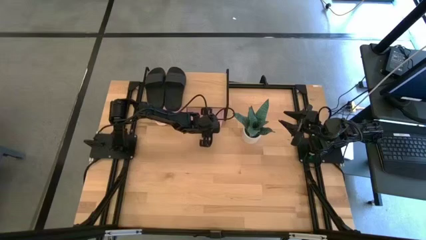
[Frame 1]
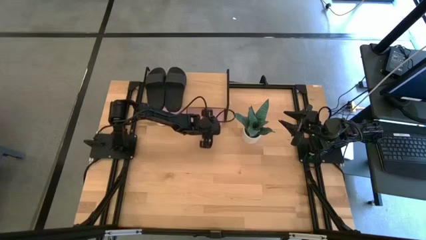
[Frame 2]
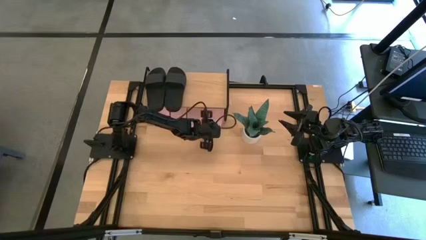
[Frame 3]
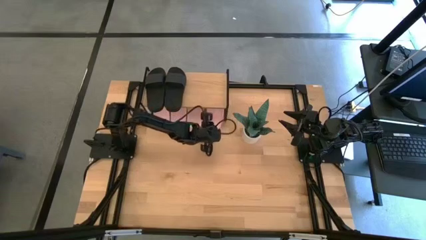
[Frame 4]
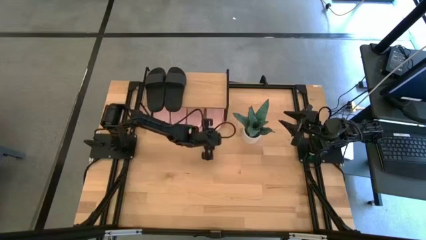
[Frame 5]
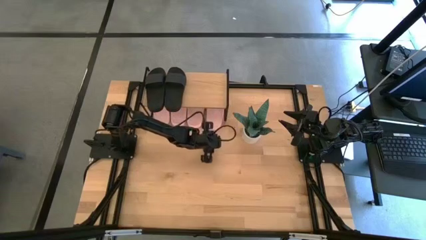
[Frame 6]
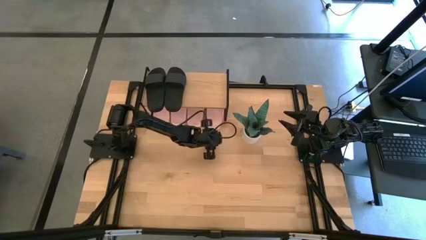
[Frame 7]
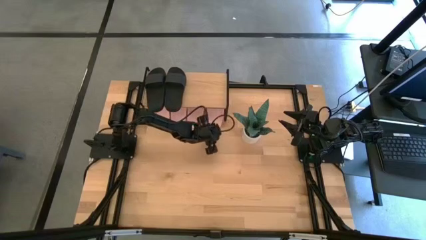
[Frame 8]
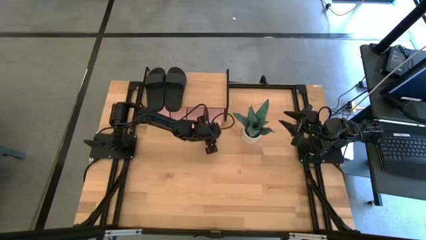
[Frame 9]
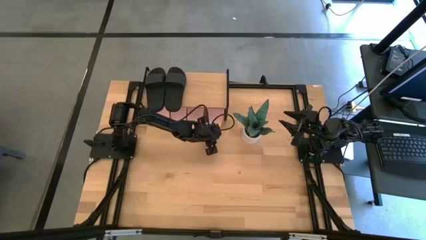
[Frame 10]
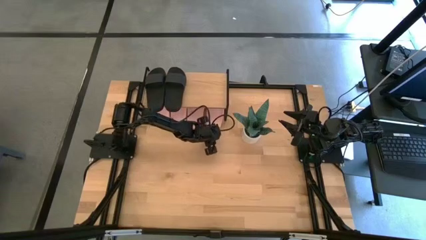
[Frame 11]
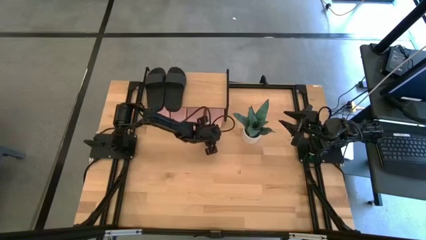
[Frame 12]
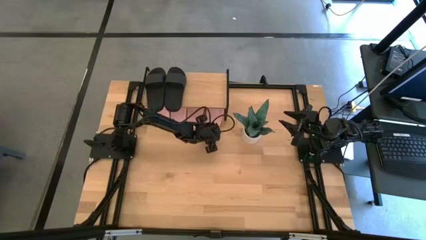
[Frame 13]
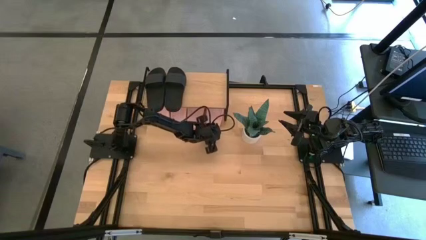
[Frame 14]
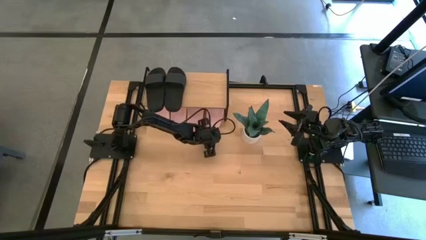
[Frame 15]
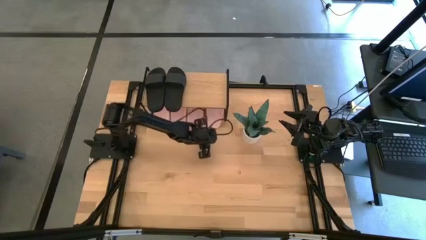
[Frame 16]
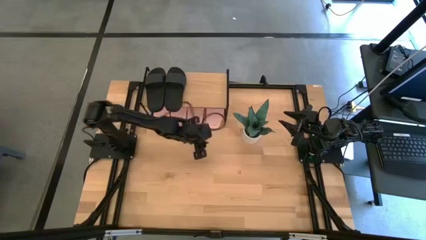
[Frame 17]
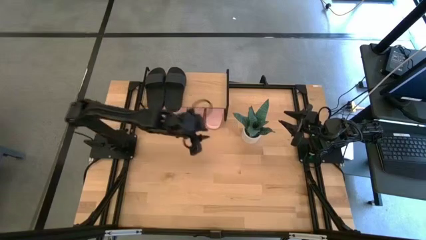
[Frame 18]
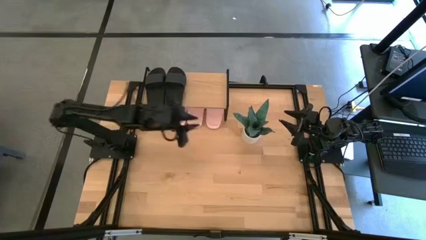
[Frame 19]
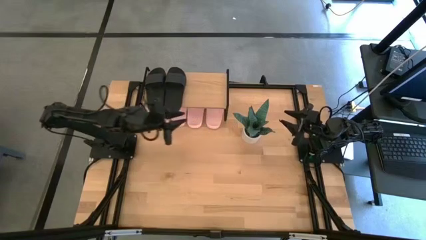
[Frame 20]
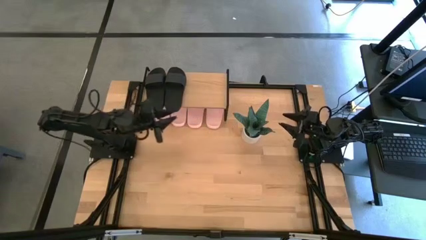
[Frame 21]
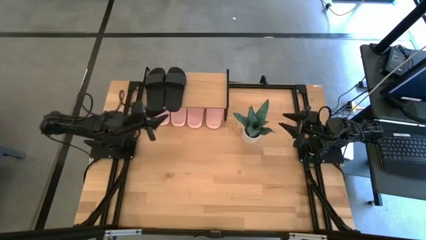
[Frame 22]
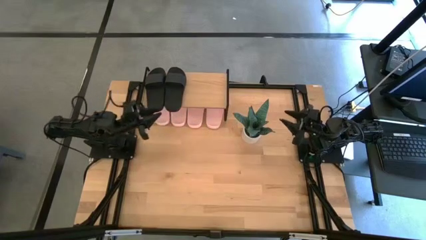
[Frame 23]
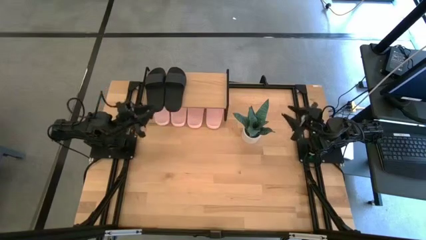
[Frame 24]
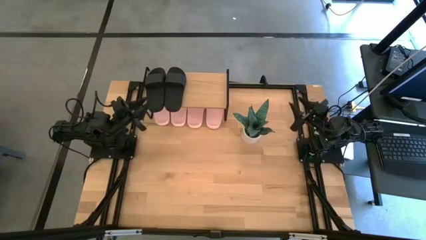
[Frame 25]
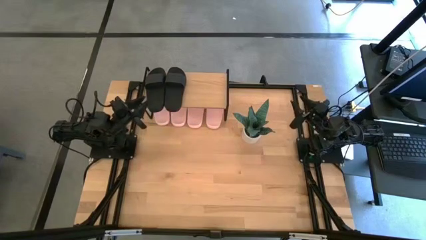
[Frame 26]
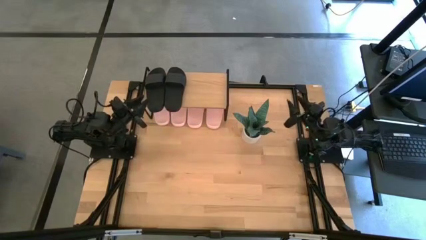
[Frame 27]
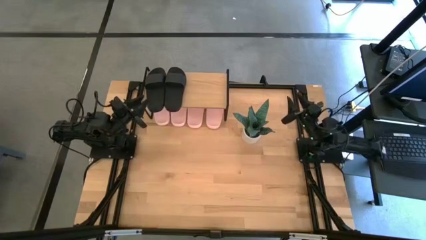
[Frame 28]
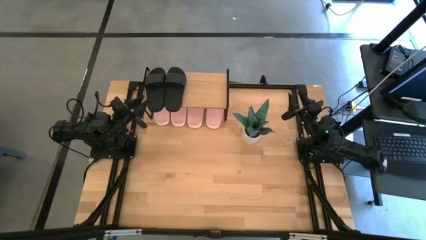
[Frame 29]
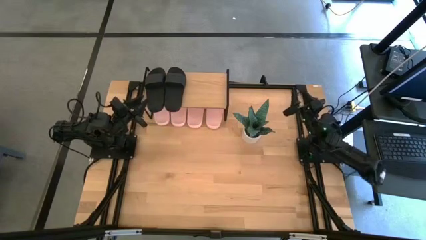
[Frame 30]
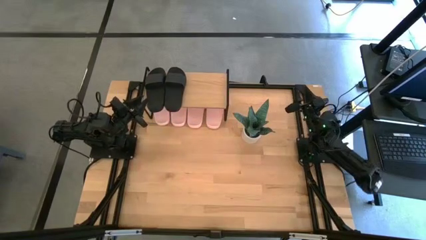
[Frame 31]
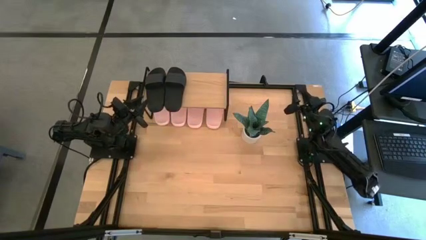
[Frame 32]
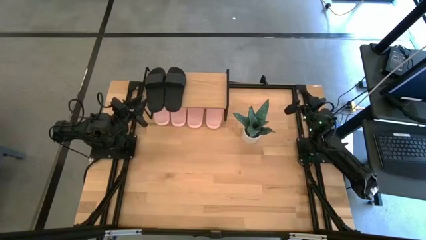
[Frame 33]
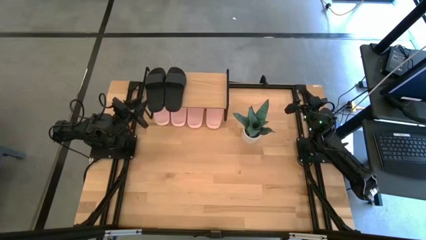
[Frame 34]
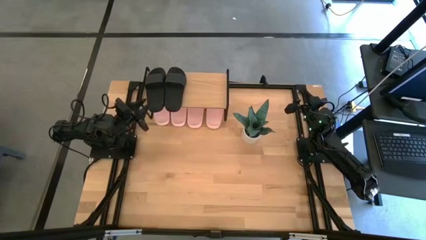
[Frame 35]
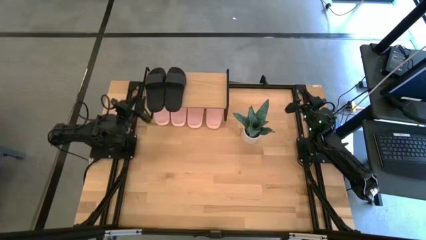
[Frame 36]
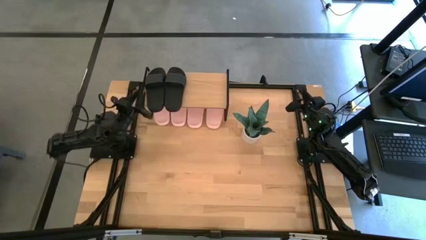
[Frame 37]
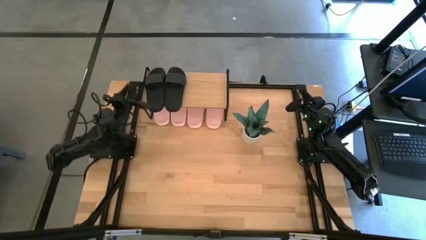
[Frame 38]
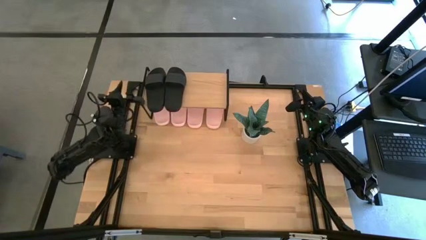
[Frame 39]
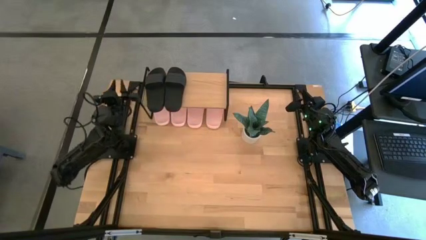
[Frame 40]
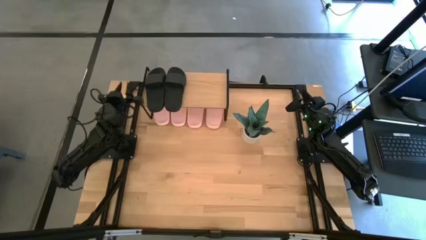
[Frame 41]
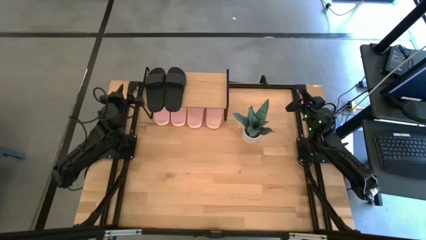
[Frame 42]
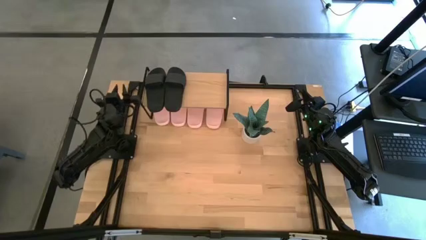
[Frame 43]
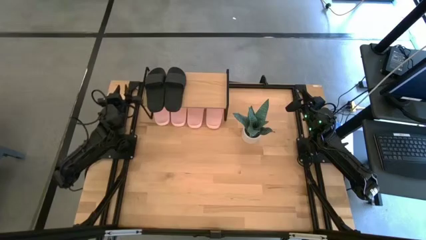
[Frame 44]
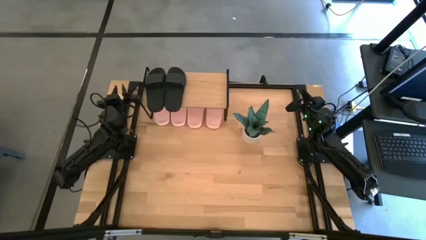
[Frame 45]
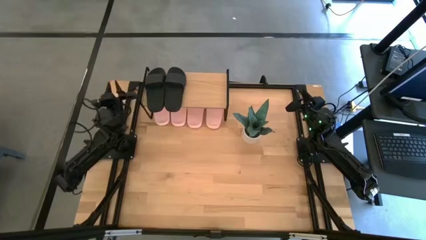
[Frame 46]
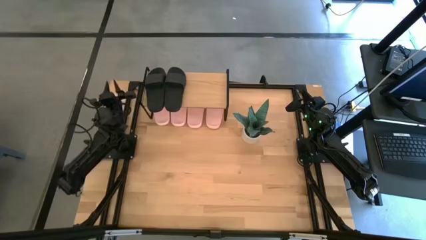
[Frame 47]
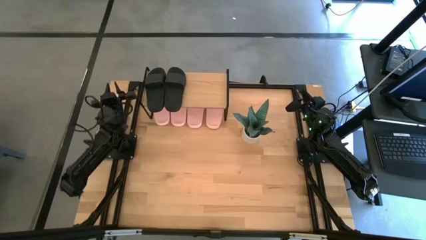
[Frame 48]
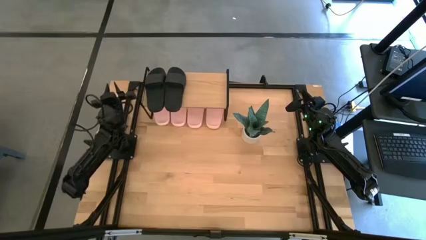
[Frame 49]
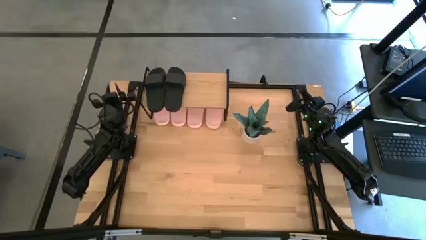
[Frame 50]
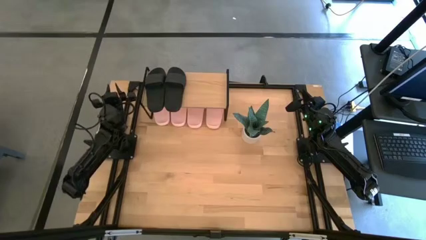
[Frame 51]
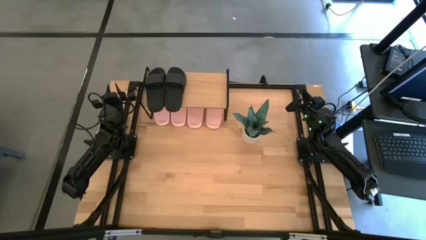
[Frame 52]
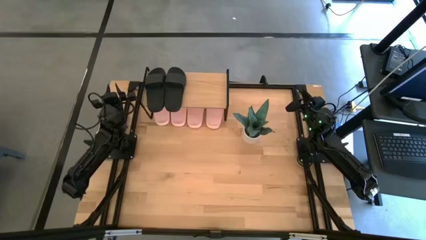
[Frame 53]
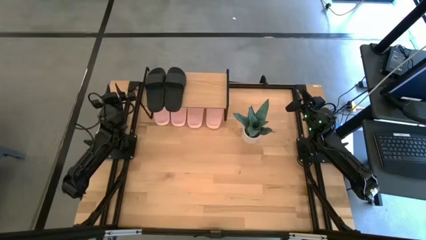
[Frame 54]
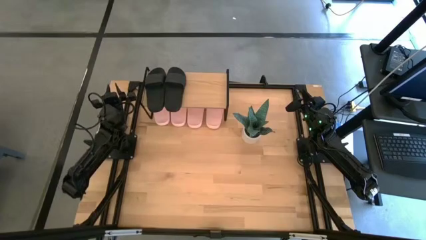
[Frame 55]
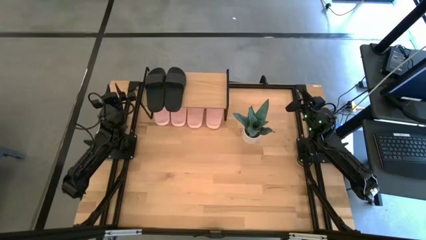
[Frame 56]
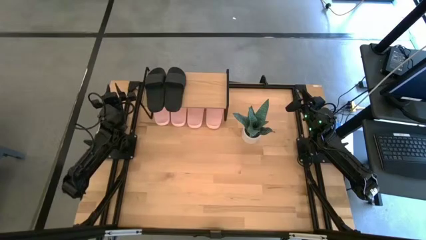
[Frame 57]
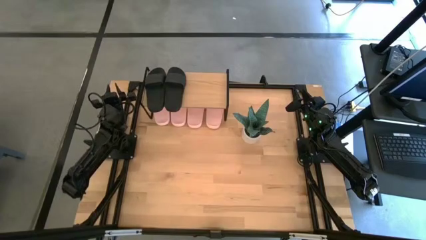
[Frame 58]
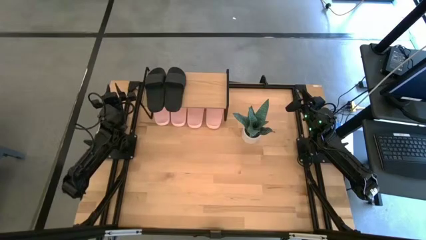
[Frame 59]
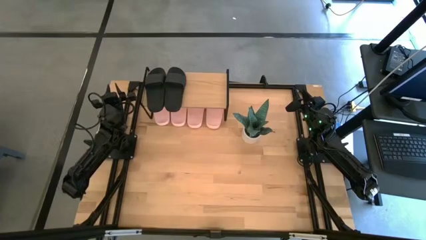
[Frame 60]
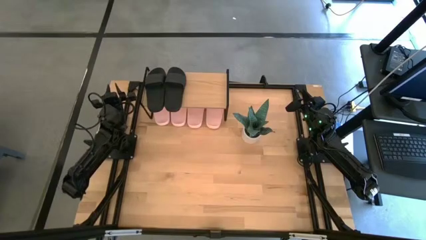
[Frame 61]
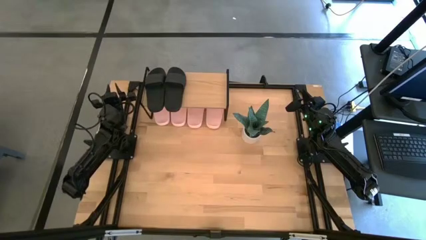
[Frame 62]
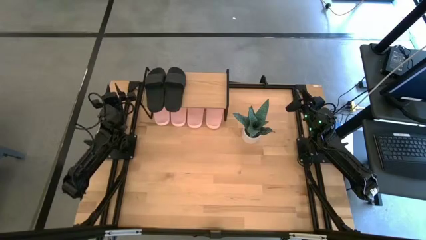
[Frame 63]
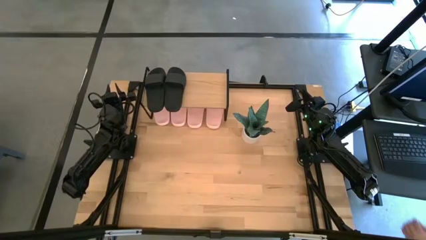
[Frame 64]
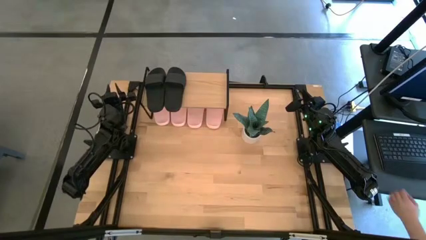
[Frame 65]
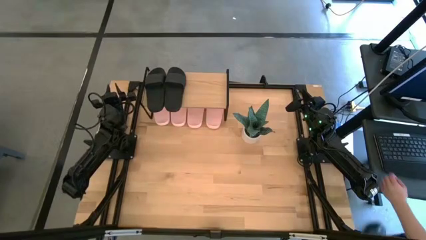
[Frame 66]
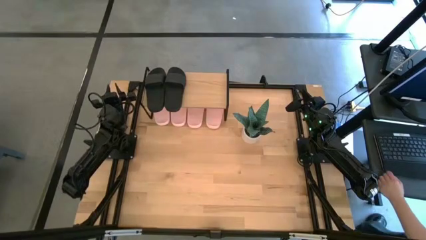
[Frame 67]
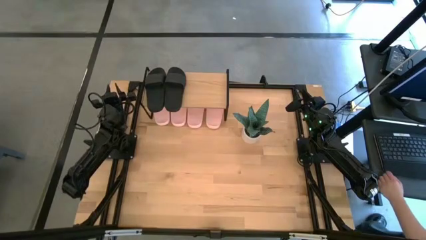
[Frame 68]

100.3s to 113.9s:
Task: Pick and place slides into the shelf
Return to Home Position

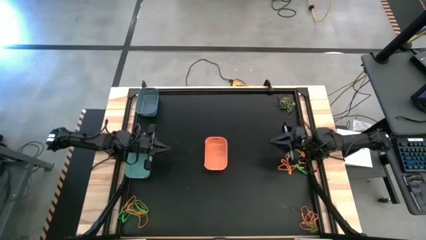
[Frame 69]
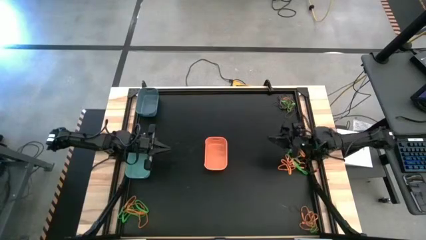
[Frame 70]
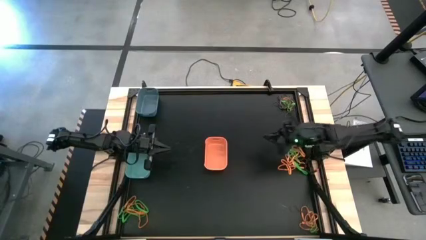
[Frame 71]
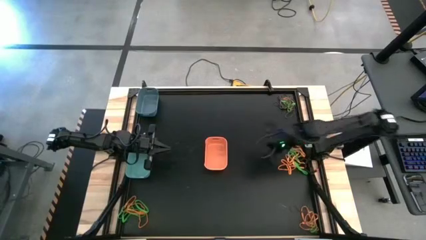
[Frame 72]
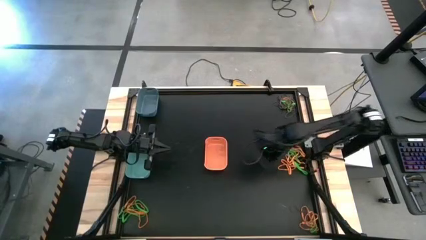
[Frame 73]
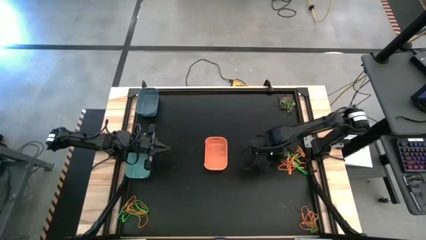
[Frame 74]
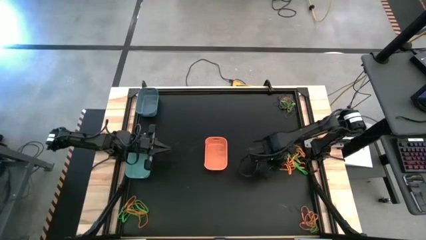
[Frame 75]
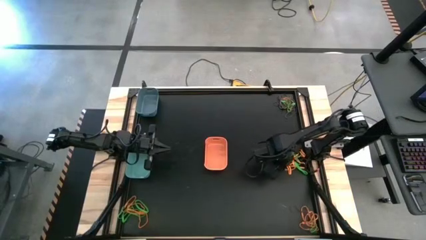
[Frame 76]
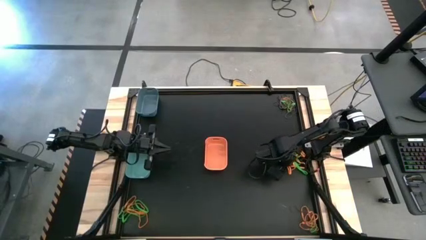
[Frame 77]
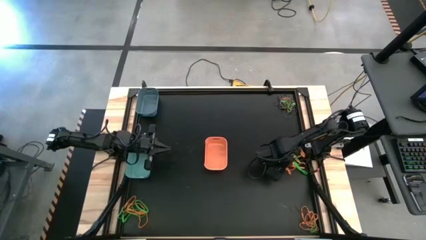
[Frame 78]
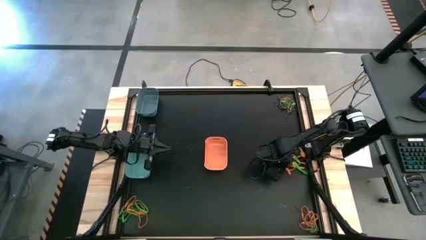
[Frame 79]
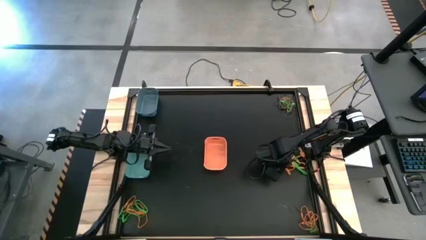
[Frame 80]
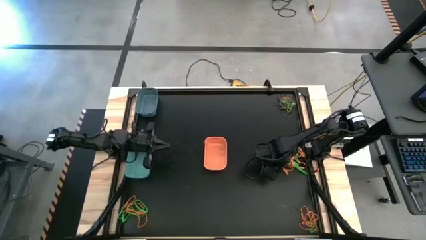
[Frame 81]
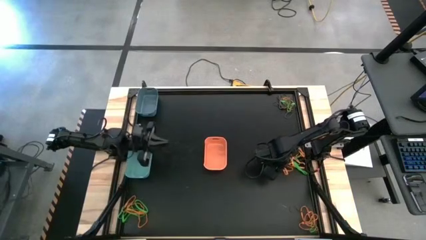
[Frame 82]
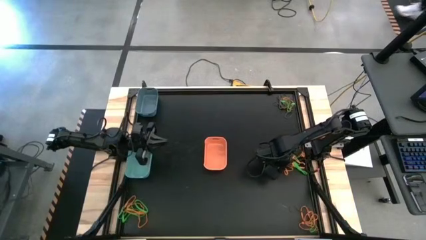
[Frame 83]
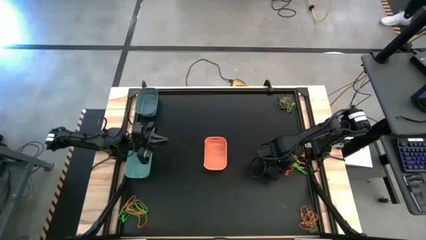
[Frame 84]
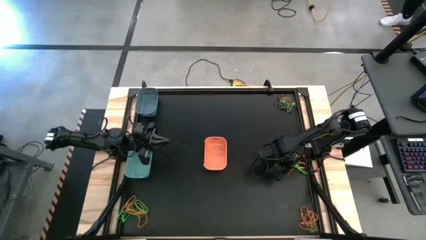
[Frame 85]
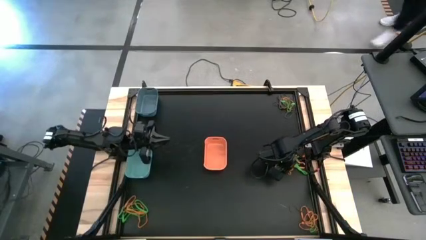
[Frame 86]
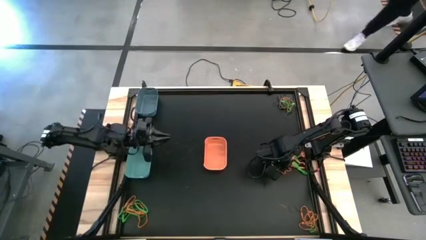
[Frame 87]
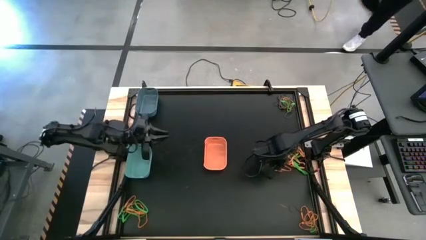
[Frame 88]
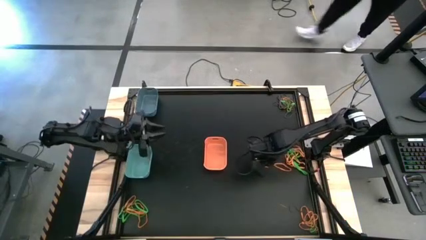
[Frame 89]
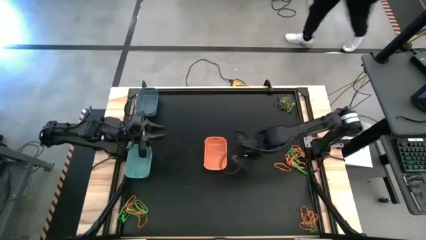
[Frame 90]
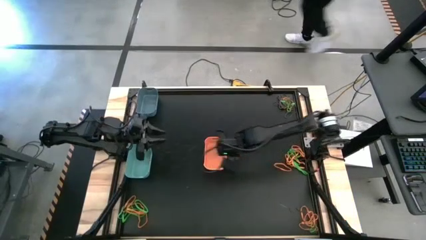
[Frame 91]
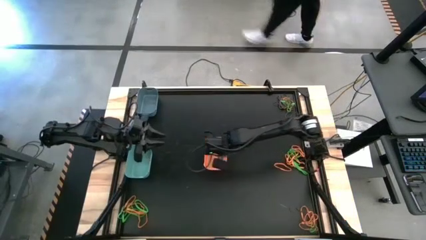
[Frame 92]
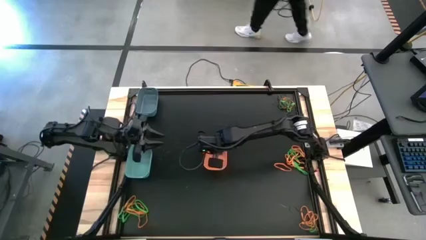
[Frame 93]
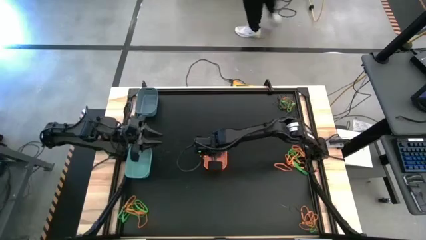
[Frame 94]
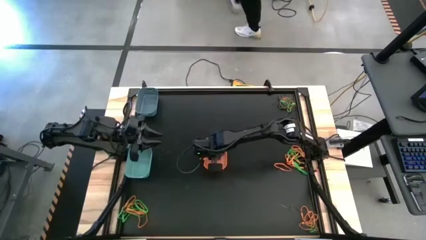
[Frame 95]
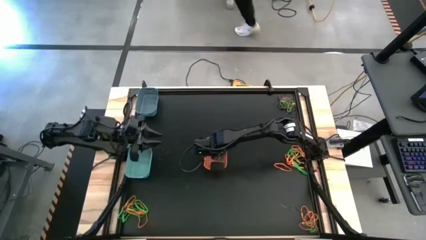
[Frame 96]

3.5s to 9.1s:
Task: Sort rubber bands into baskets
Put the orange rubber band into the orange bin
